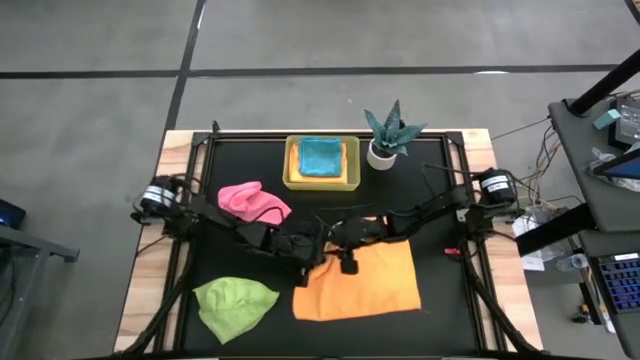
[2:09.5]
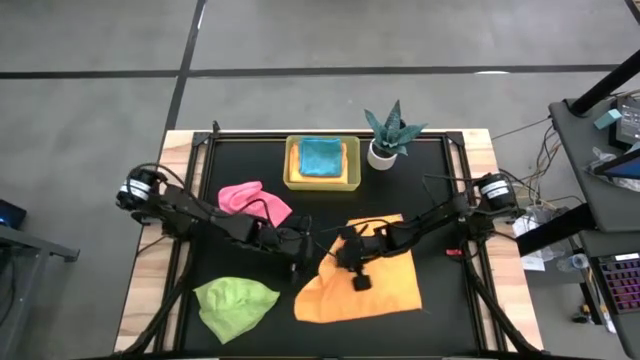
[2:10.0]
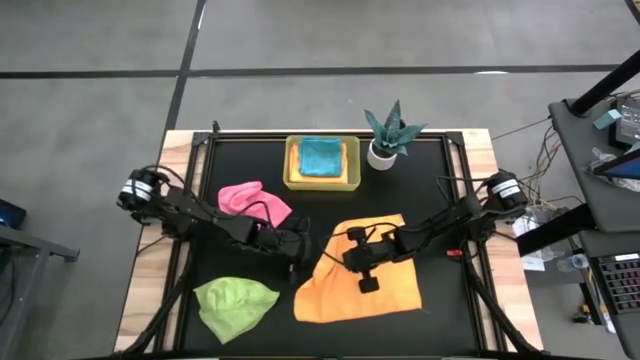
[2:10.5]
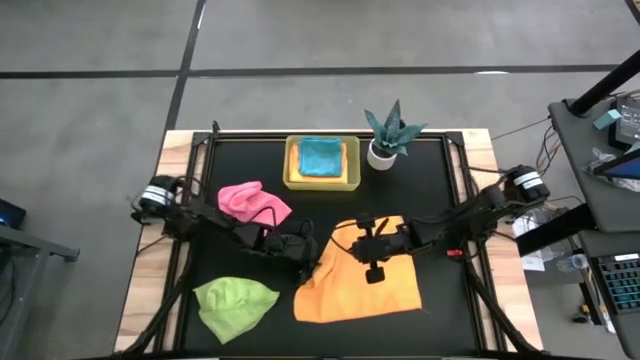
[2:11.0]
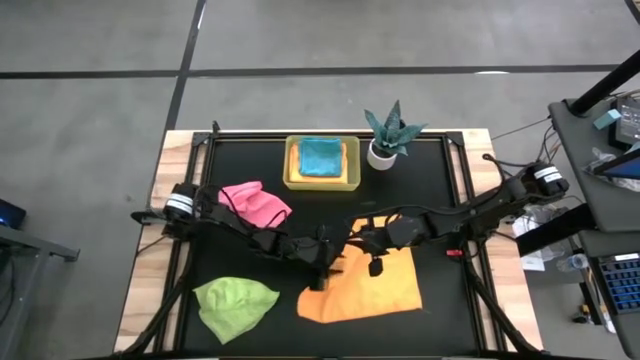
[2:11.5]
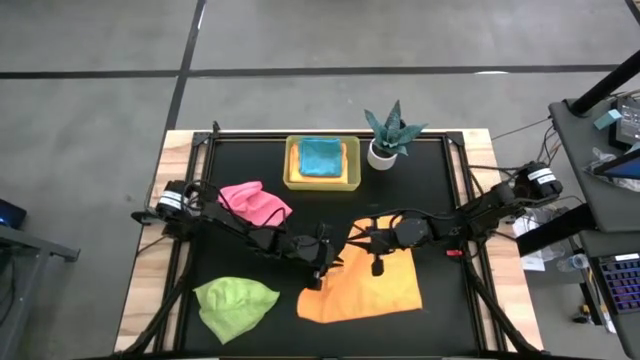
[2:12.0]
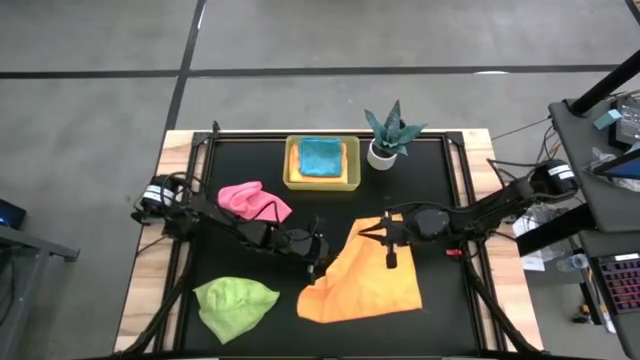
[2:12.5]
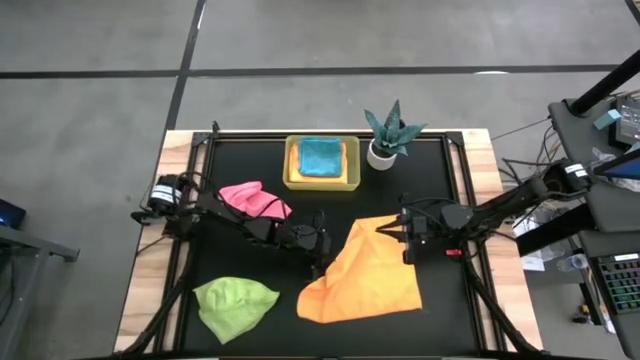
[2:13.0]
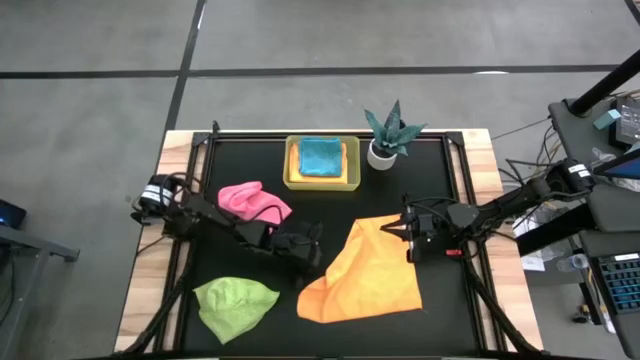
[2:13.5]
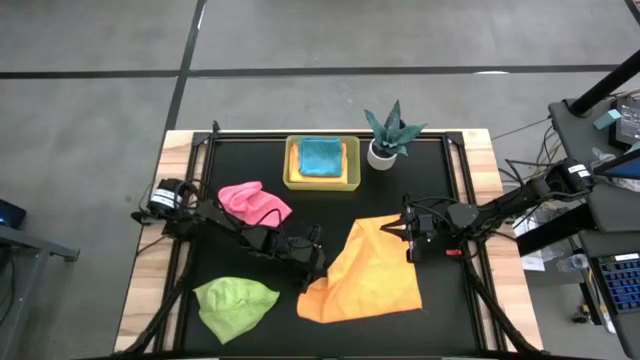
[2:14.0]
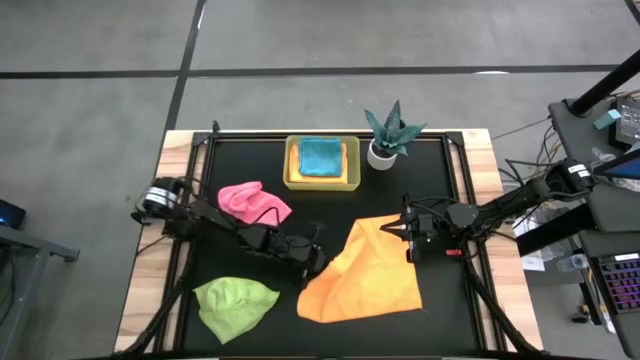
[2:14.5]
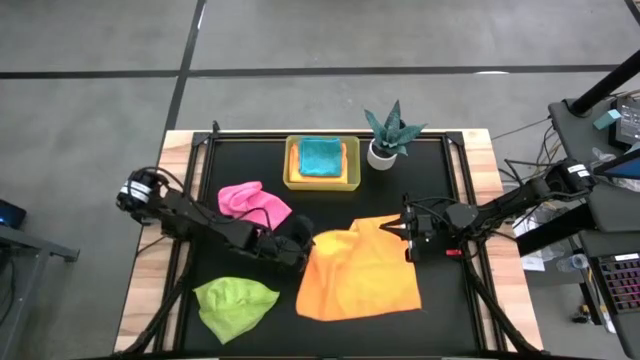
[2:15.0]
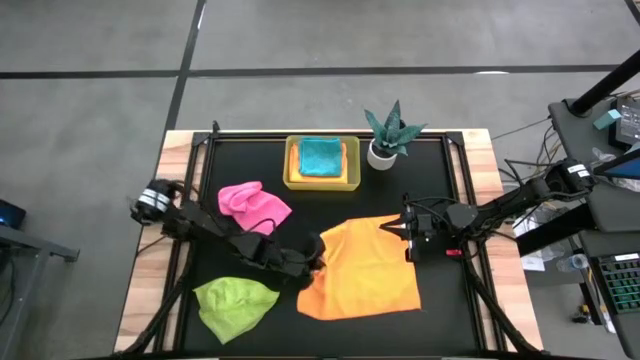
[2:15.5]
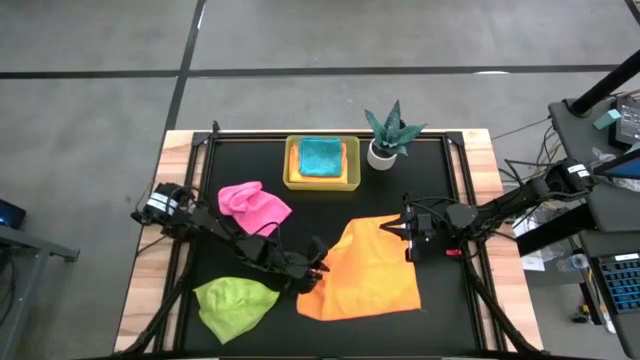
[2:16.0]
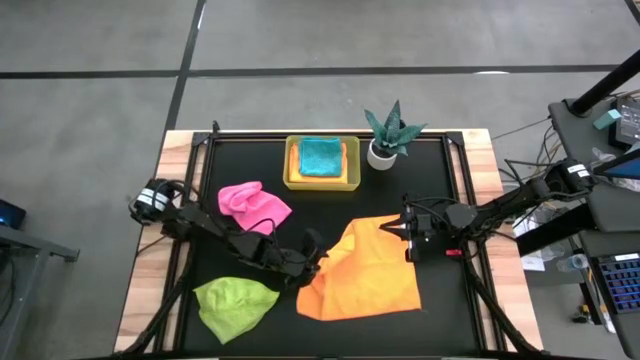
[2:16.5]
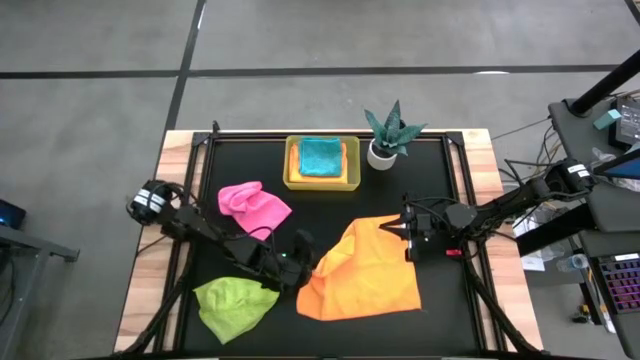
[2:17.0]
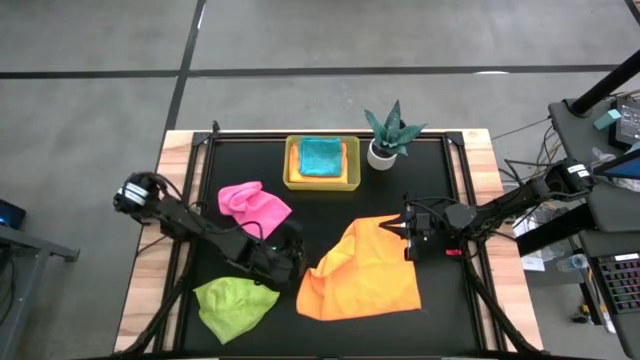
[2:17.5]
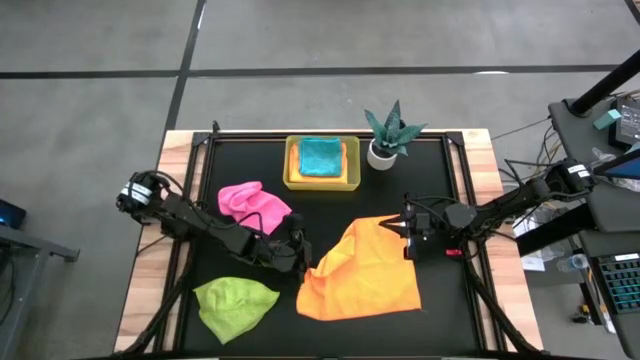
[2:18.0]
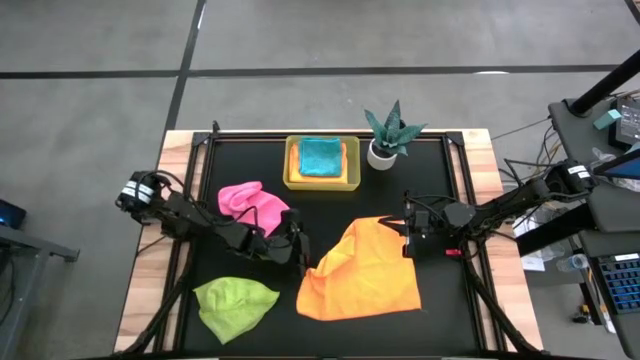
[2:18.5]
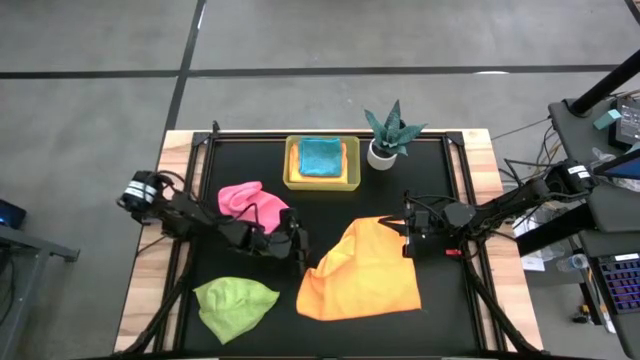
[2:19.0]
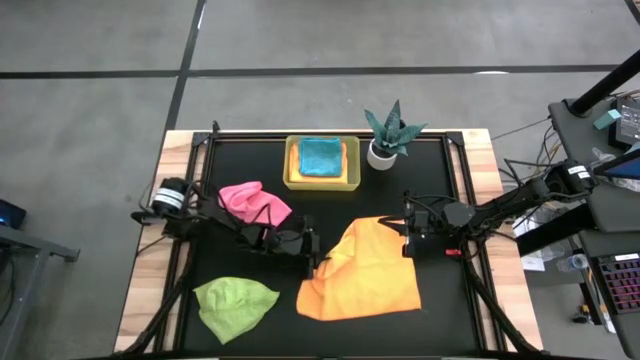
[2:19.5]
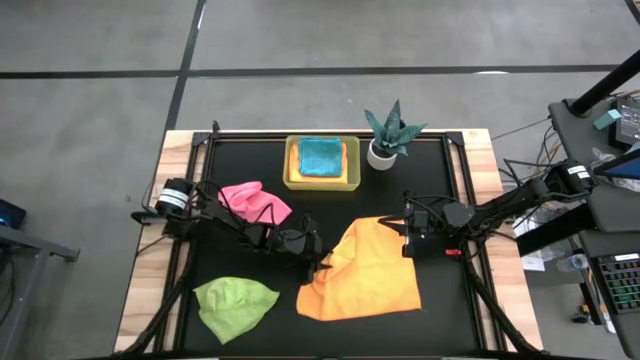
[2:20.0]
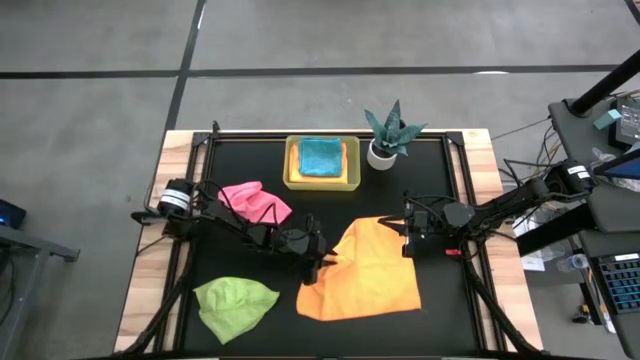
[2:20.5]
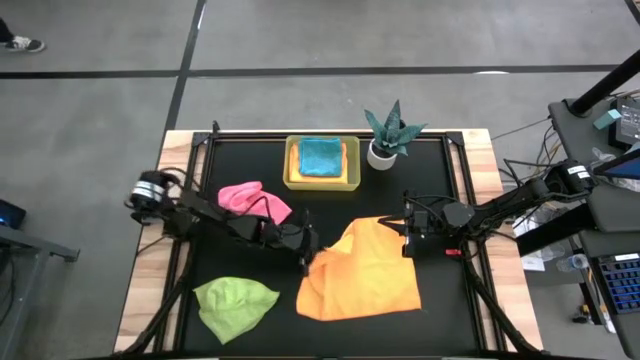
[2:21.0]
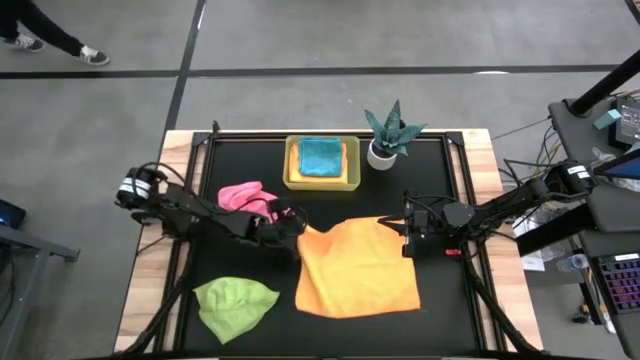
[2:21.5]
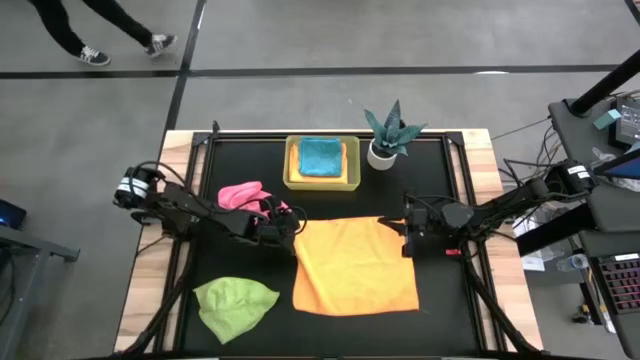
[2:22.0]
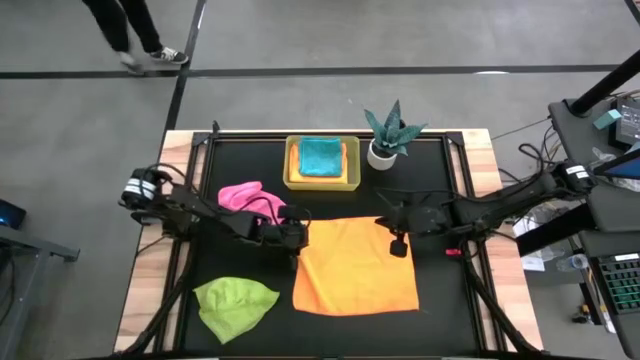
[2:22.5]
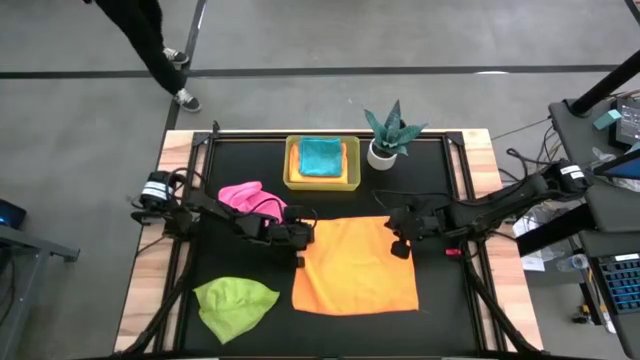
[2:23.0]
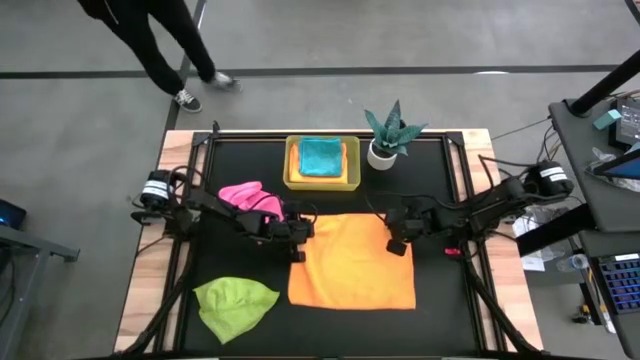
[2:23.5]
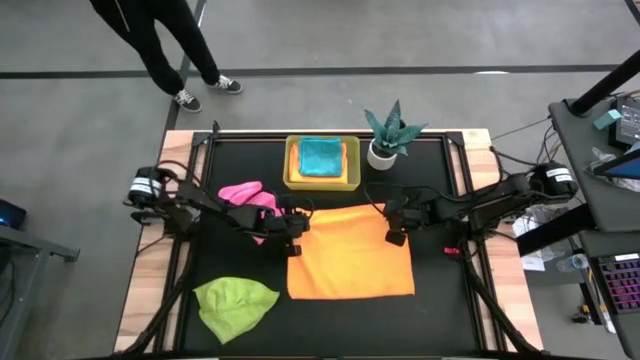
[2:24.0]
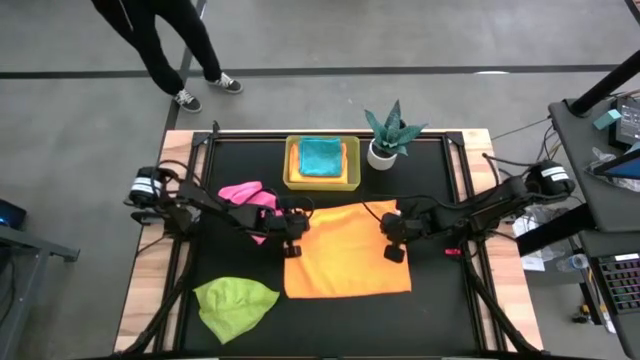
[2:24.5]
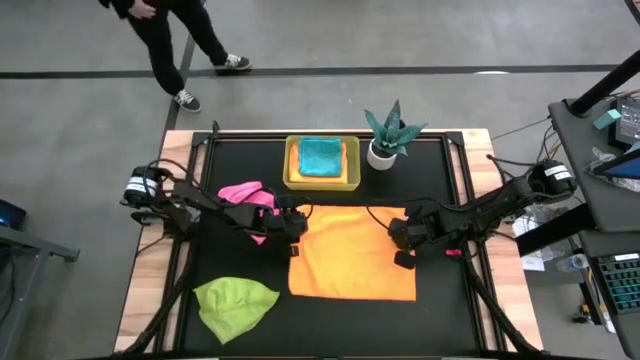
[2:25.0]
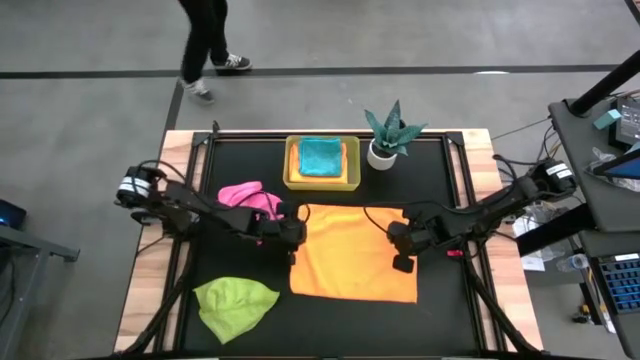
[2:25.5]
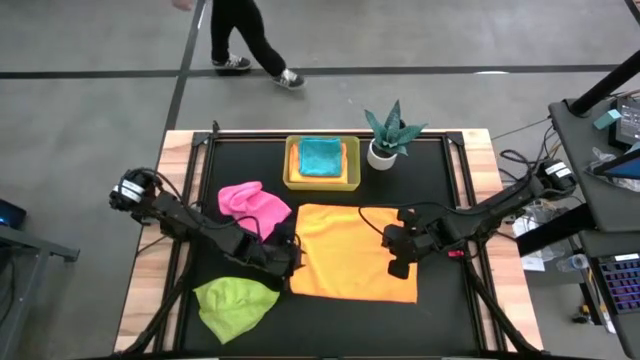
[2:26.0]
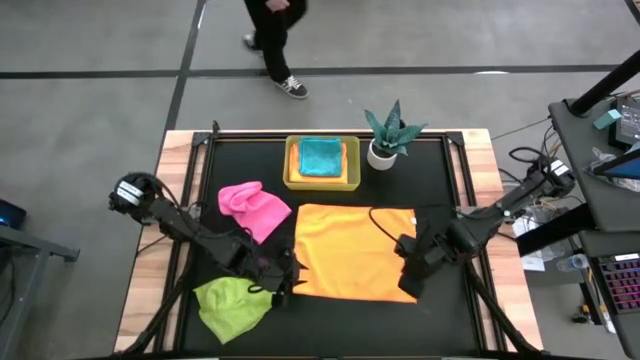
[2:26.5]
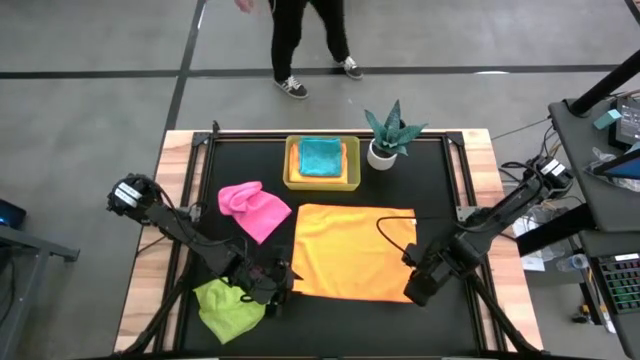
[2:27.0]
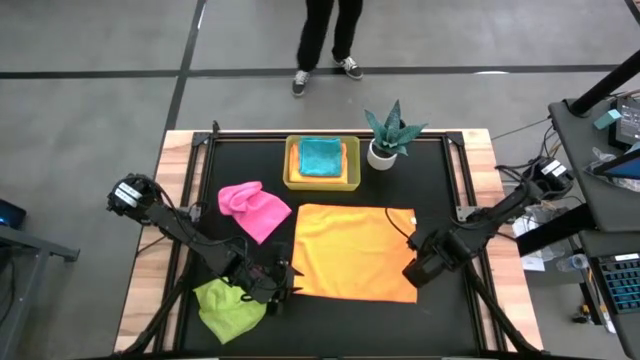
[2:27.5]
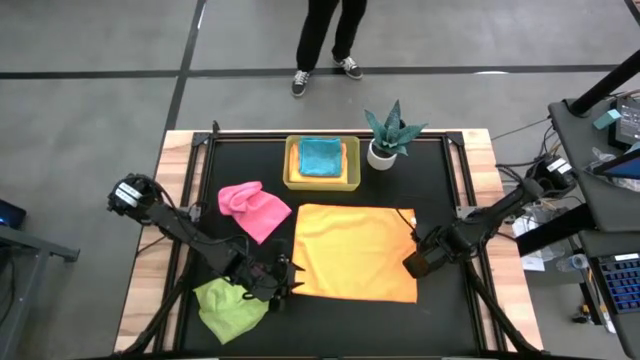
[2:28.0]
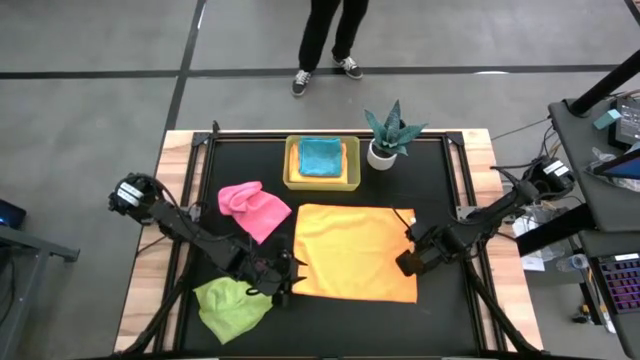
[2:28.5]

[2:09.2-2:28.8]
Task: Fold microfiber towels
Fold the orange microfiber cloth

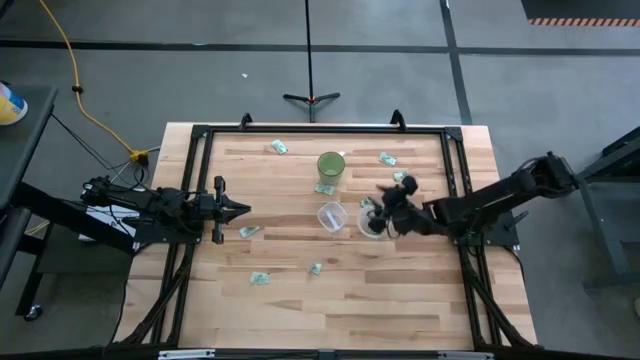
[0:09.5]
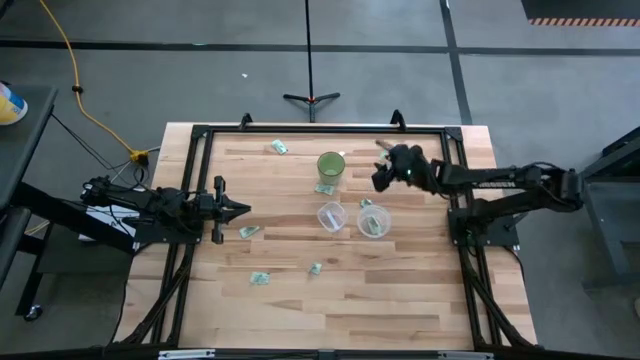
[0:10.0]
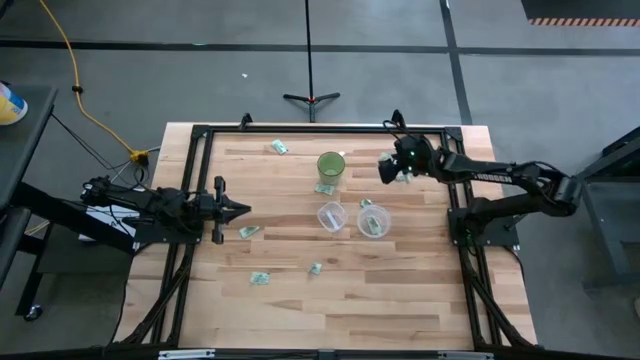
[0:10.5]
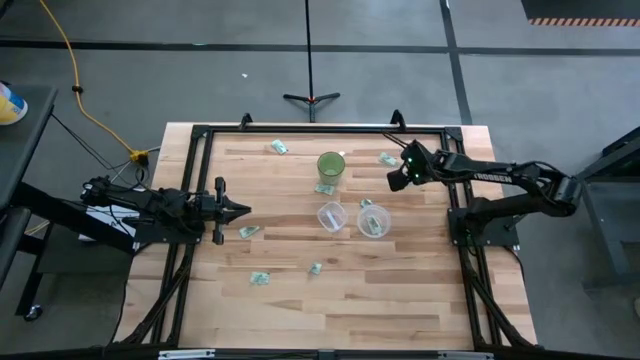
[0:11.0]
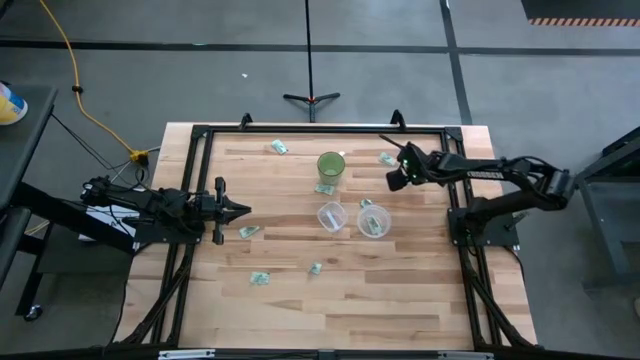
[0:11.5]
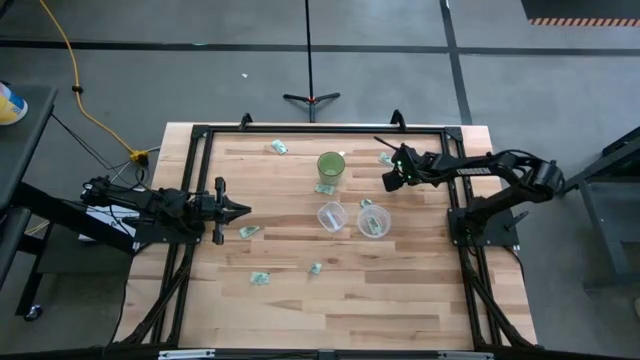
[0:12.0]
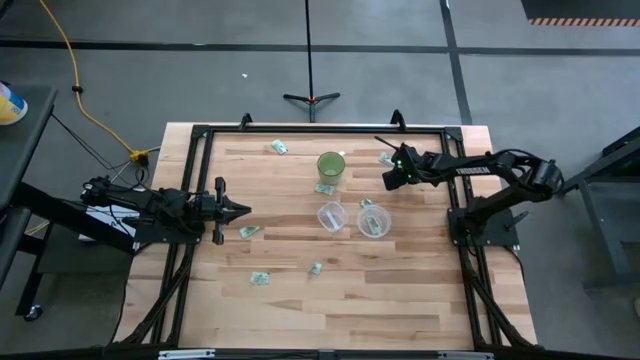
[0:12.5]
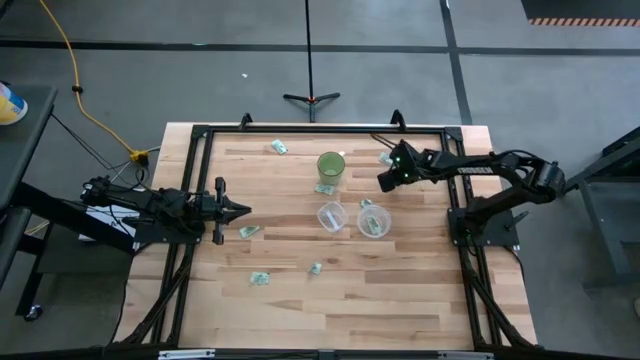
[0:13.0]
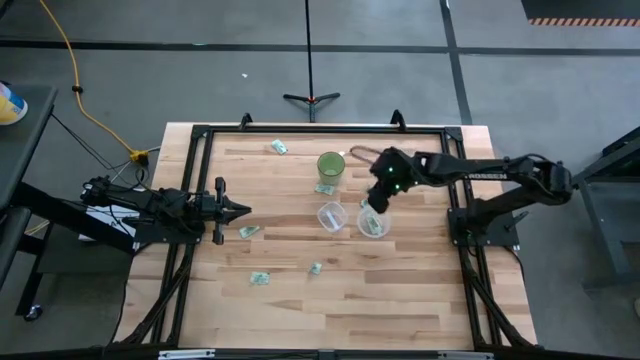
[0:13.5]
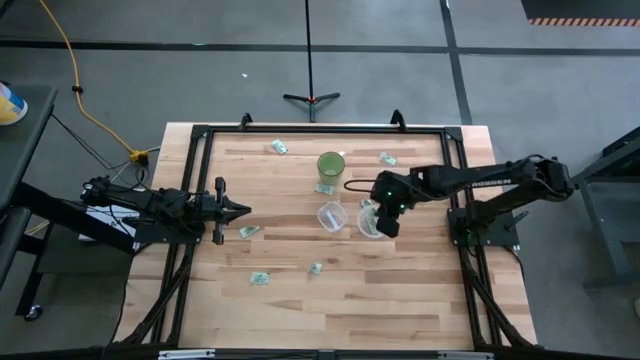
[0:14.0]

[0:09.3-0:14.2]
Task: Pick and place items into bin
Put the stevia packet into the right transparent bin
